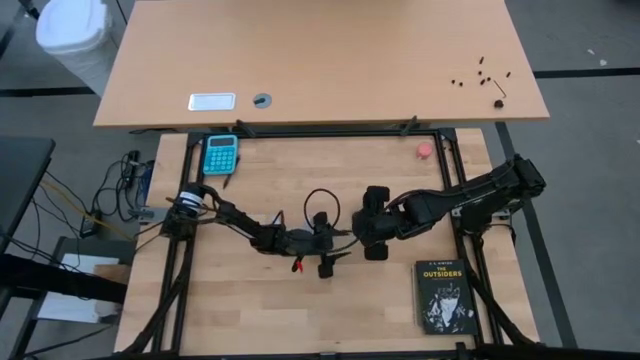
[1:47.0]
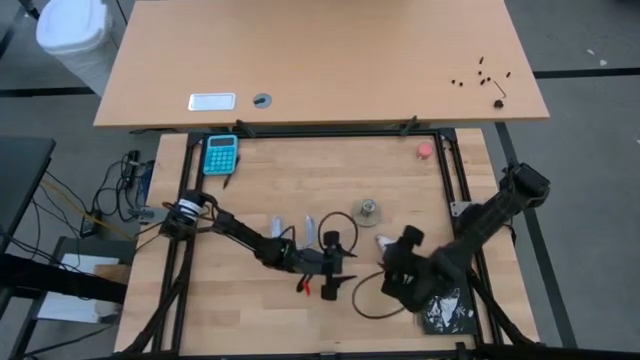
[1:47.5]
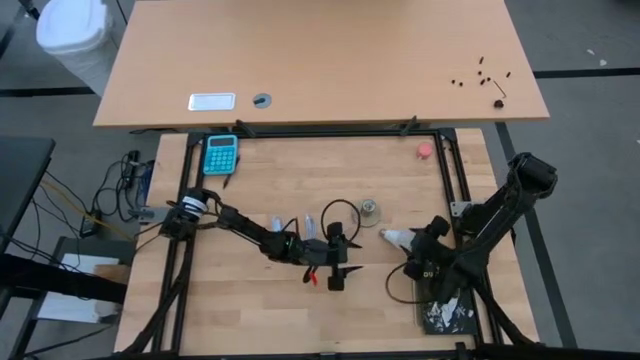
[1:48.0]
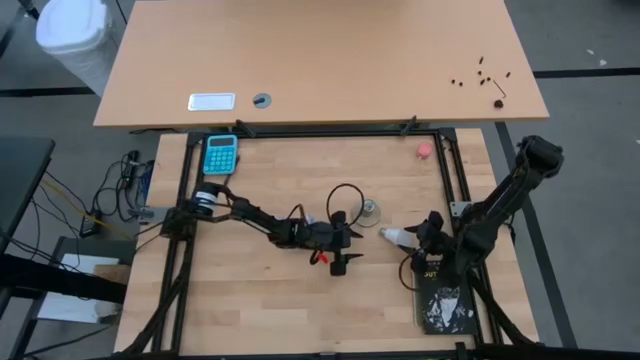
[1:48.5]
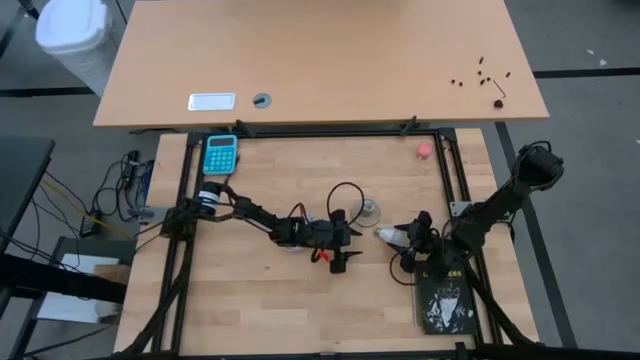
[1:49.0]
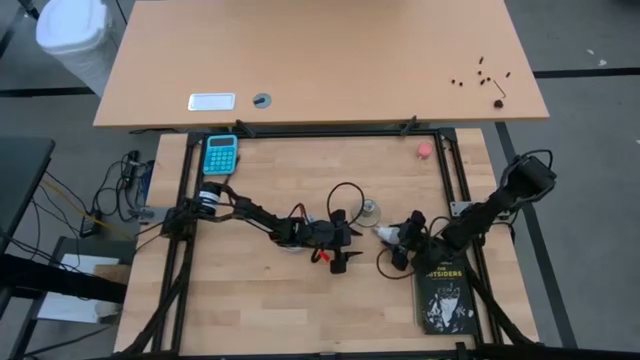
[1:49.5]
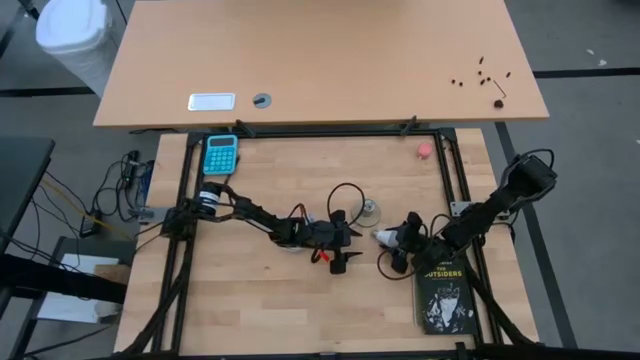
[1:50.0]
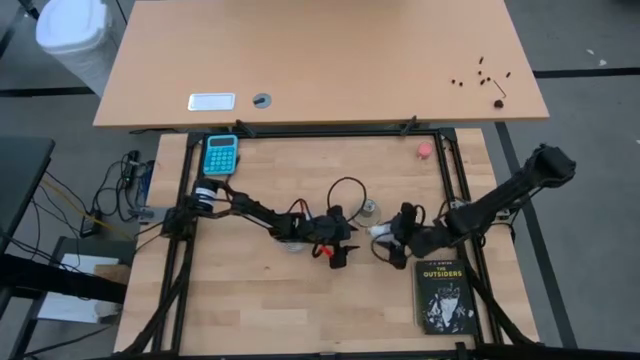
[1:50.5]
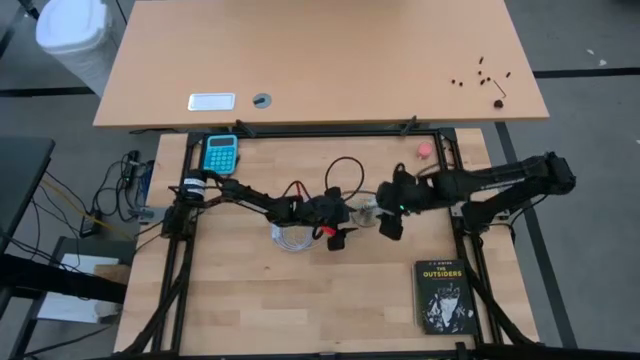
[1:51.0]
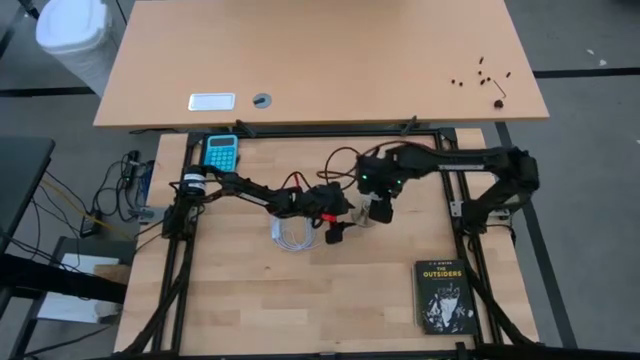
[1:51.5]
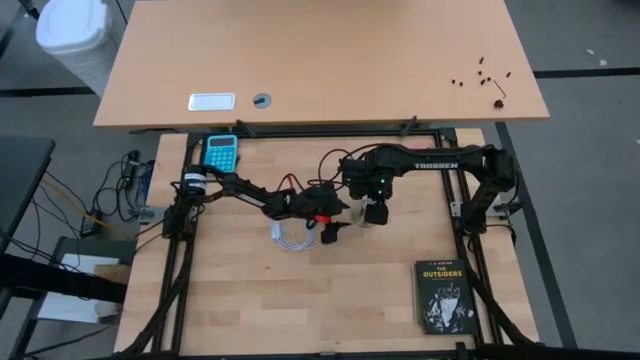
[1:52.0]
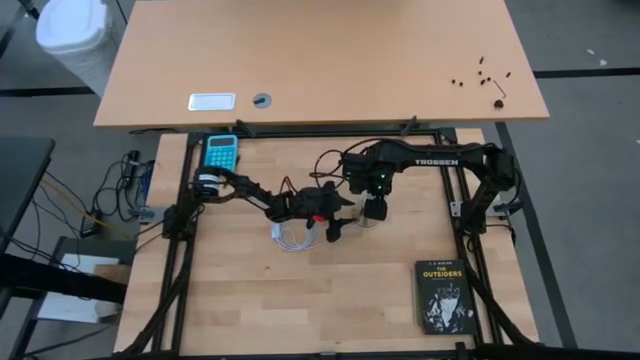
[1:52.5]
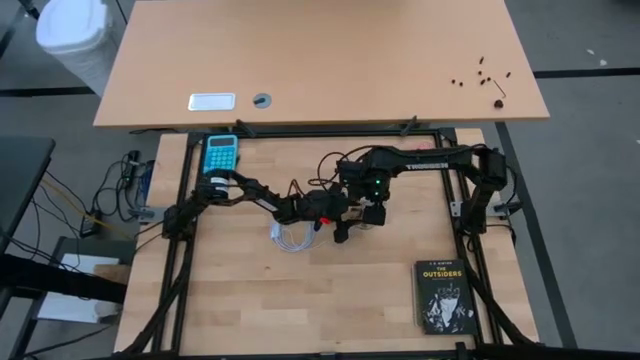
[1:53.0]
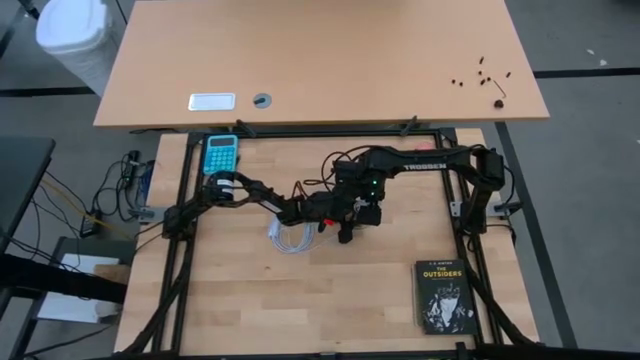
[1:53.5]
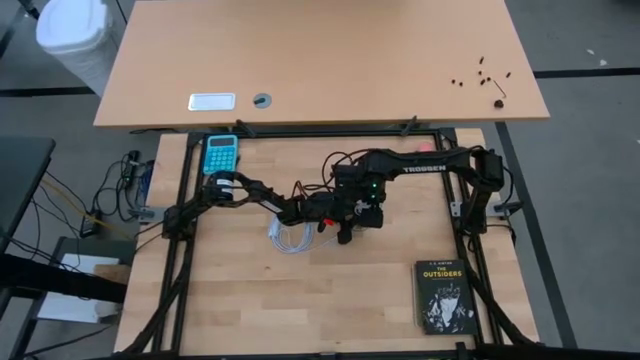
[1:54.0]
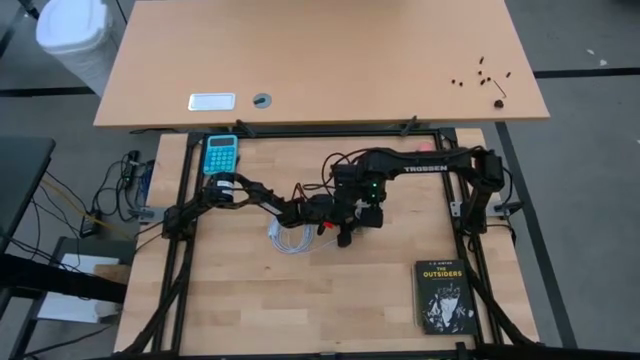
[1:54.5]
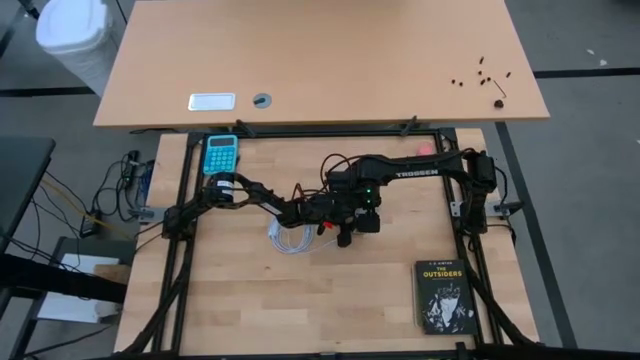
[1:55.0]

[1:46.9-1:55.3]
Task: Screw lightbulb
Insert the lightbulb into the lamp

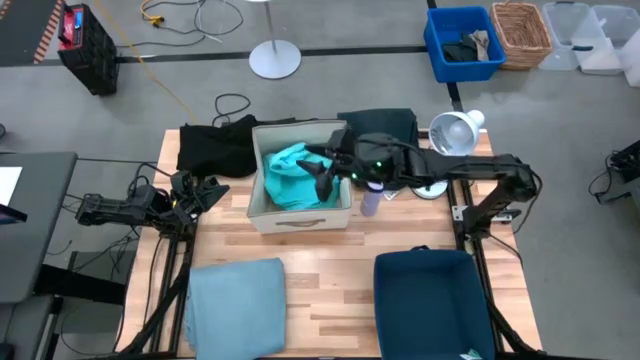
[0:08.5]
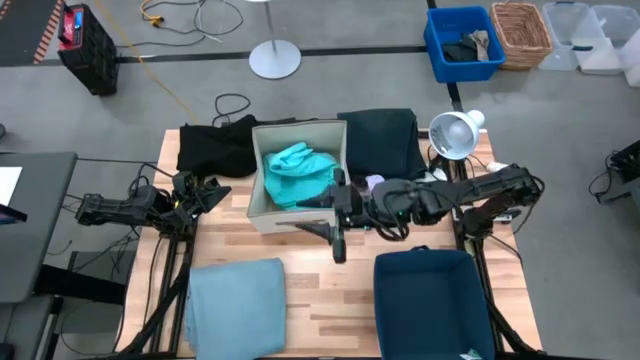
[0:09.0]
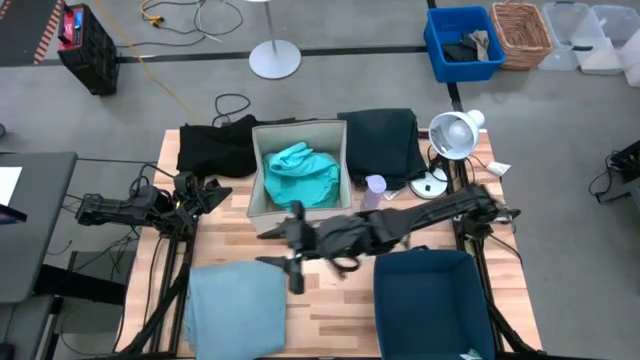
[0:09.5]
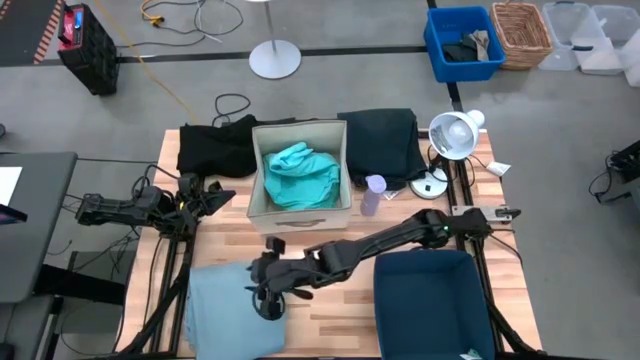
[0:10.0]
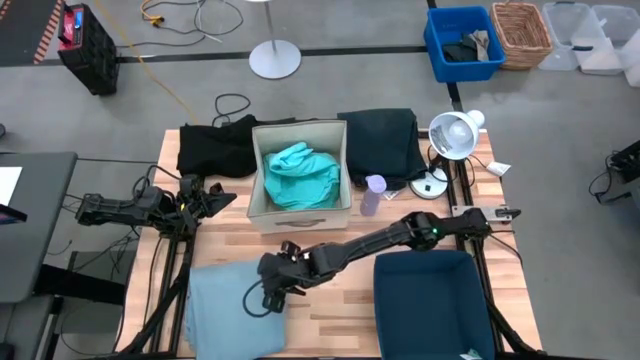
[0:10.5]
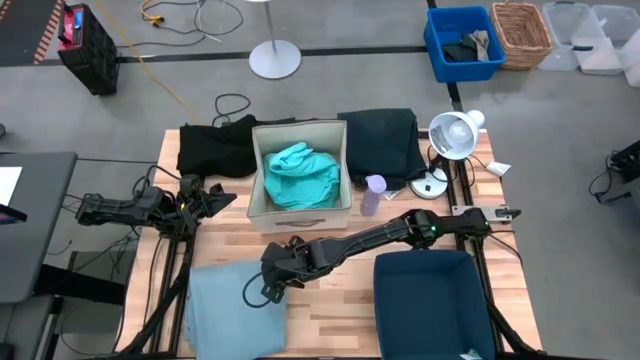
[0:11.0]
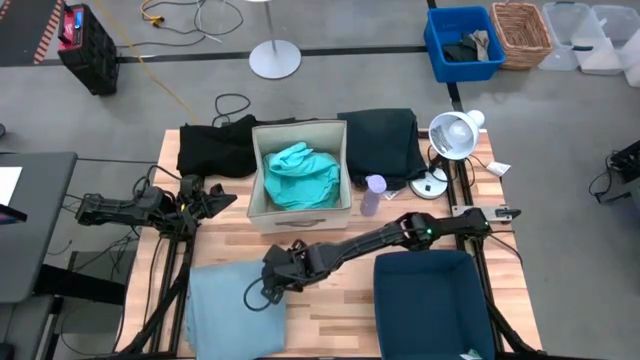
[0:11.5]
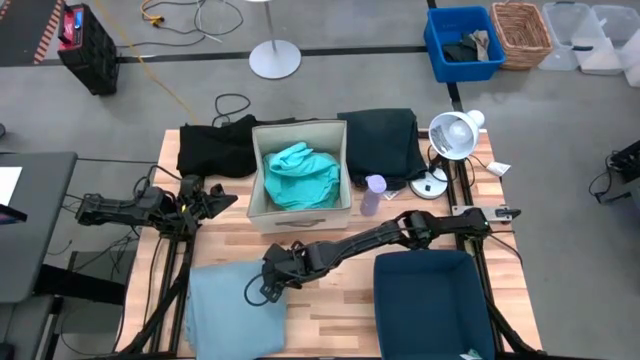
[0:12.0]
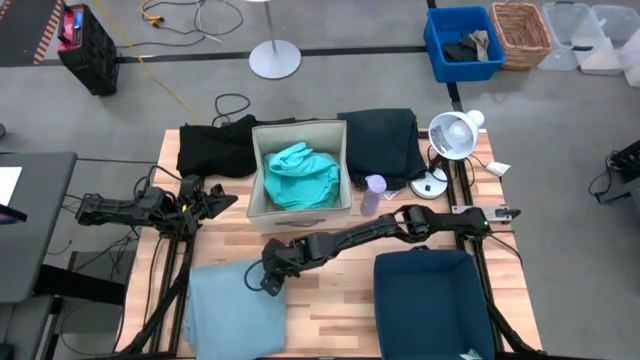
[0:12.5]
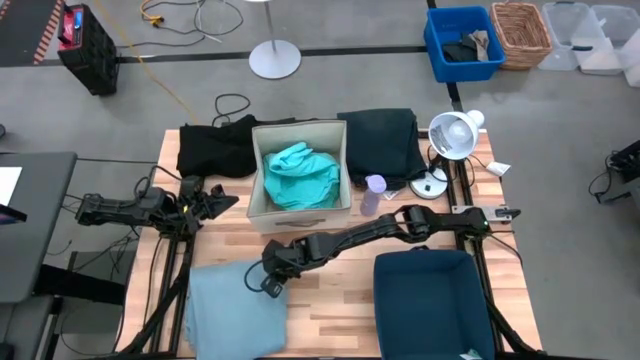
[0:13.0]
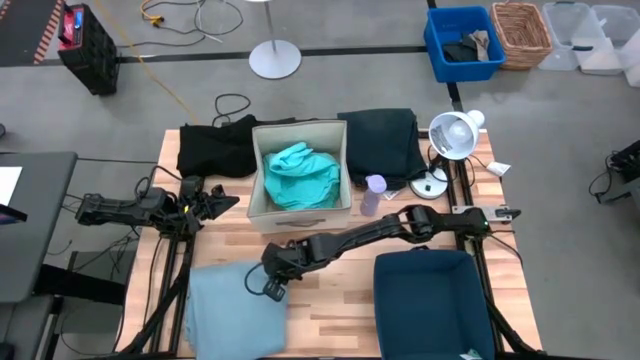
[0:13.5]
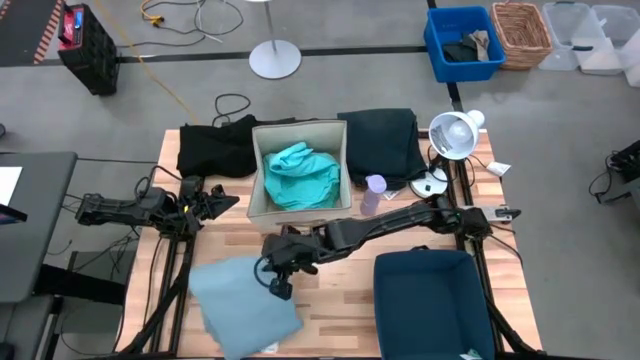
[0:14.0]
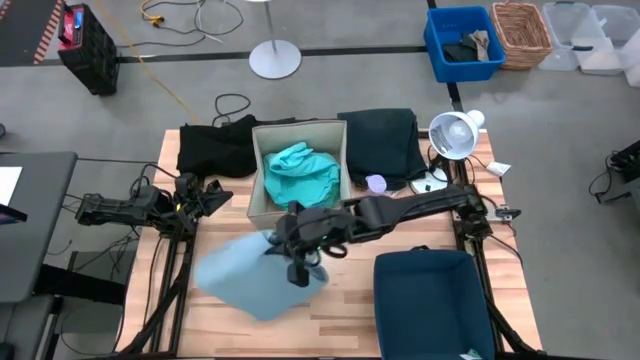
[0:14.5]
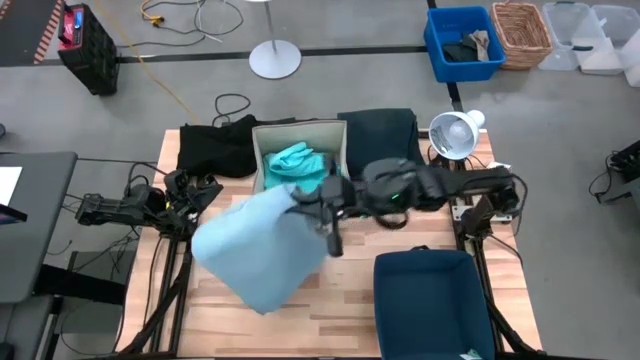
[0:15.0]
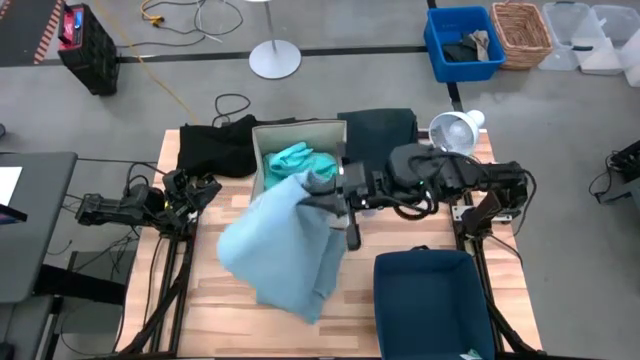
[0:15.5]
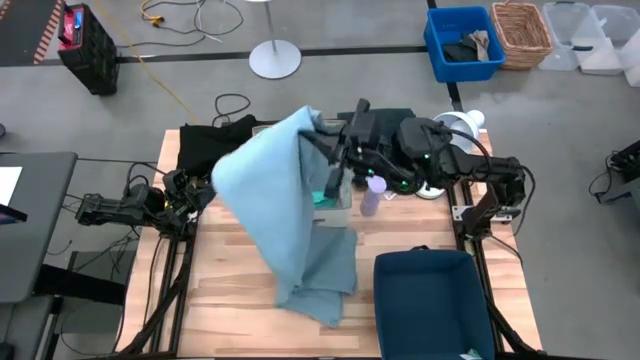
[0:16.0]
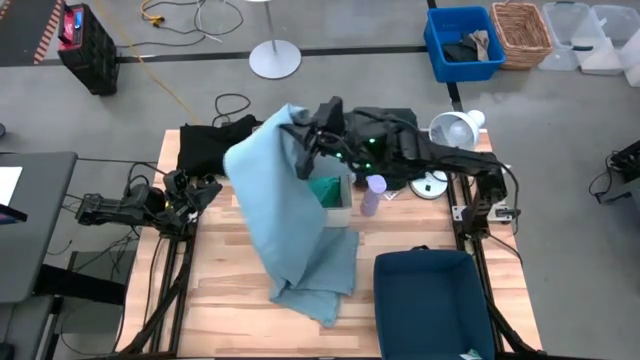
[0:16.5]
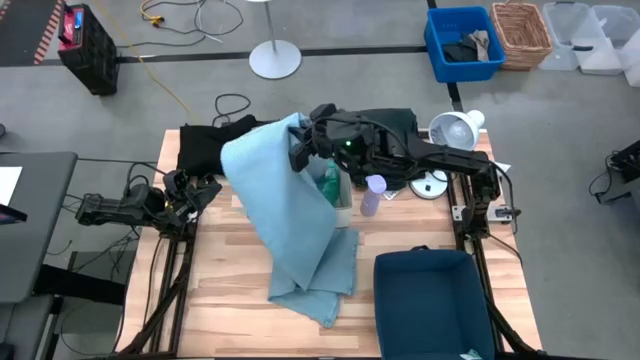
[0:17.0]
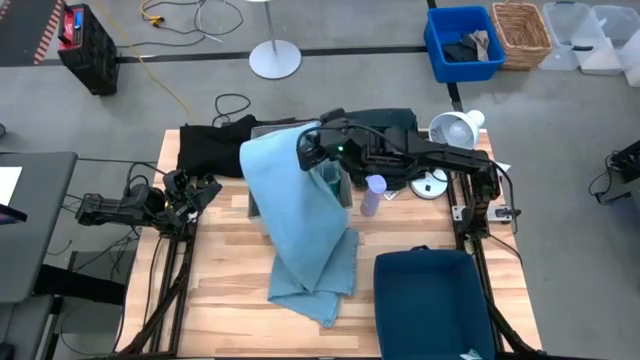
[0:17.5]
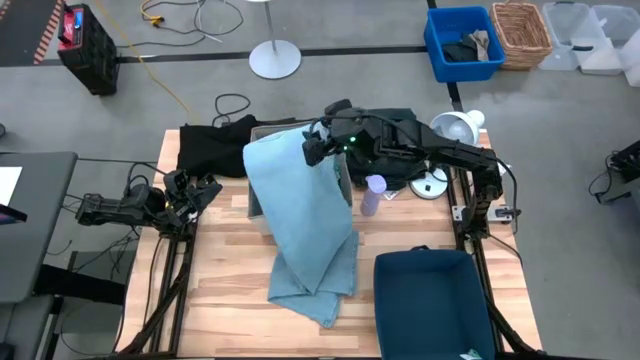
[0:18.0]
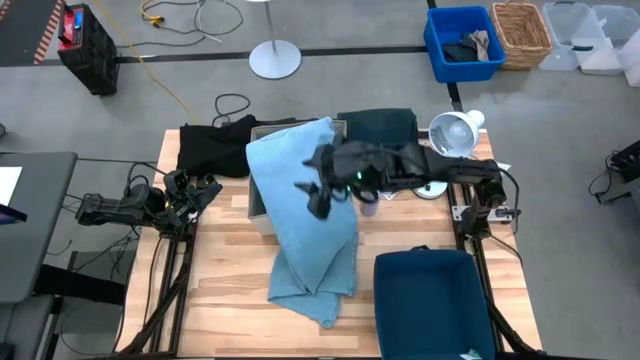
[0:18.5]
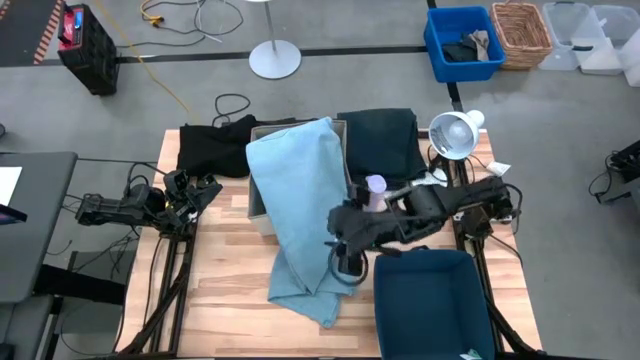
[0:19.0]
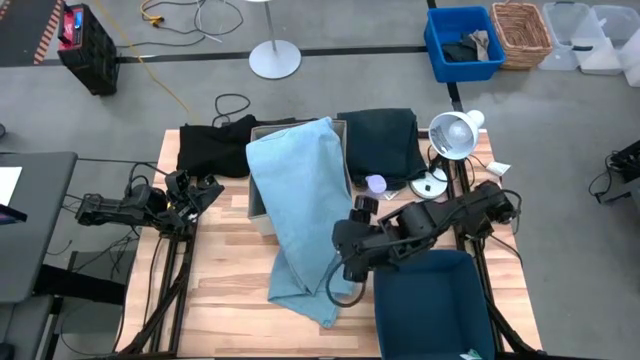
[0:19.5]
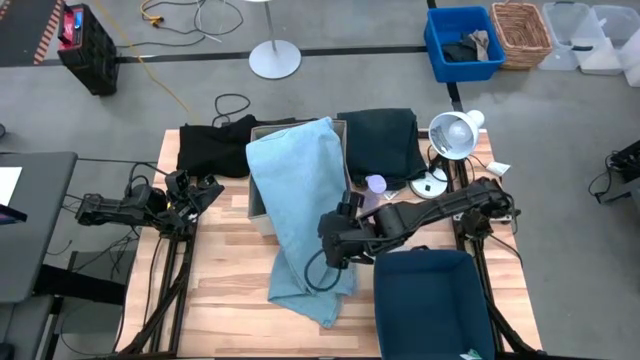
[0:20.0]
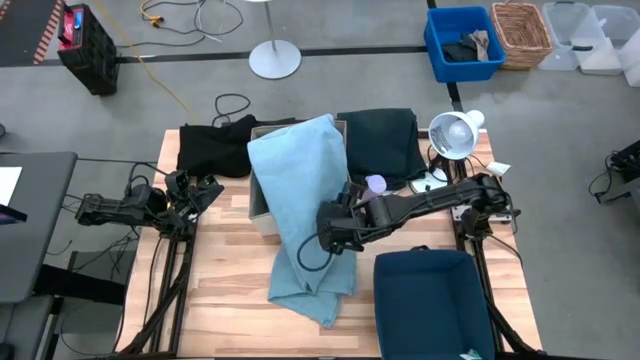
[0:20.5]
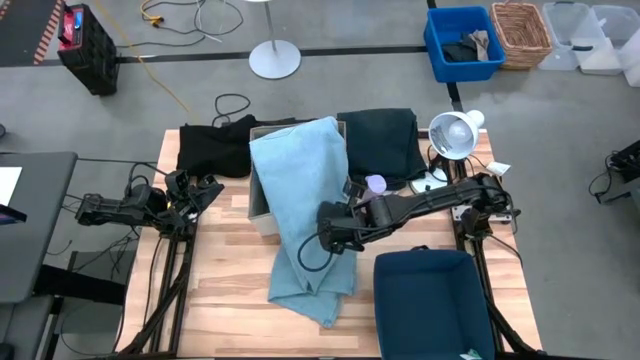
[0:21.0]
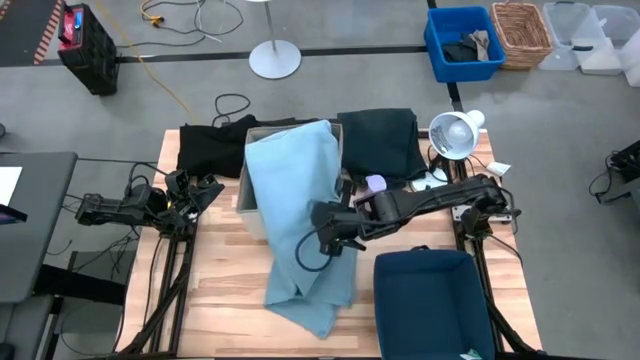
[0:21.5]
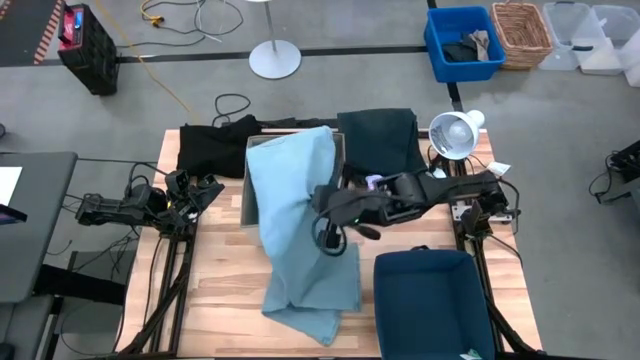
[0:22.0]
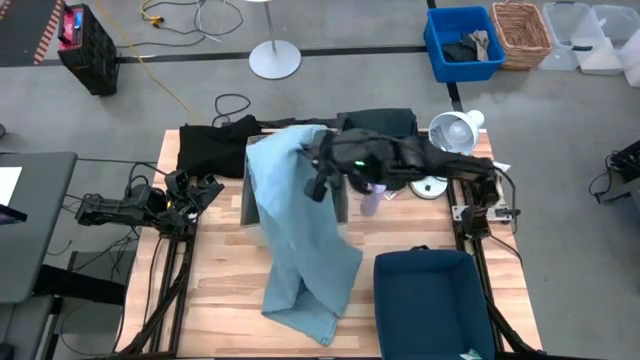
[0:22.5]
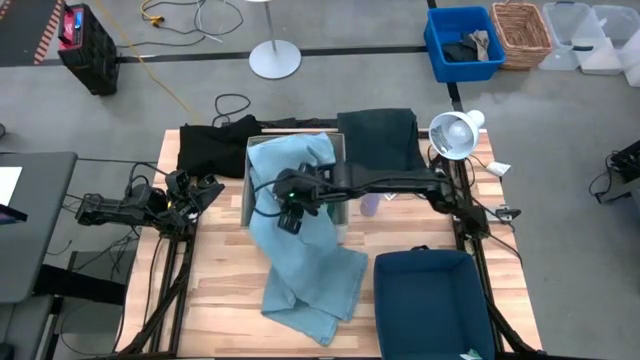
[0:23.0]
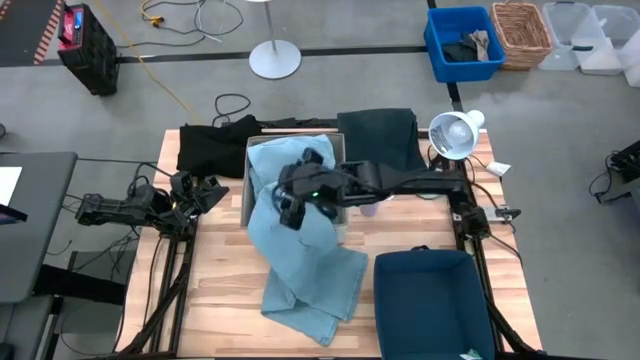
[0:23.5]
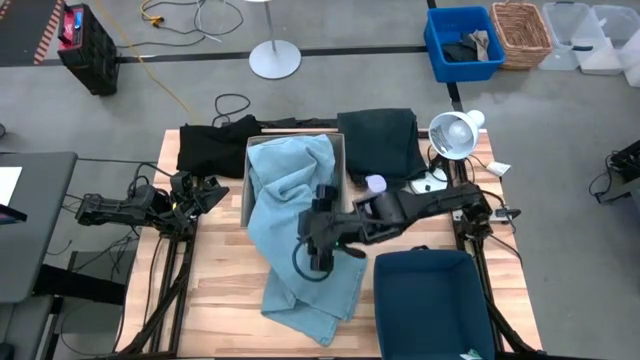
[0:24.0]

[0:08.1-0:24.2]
Task: Sort clothes
Put the blue pants into the laundry organizer
